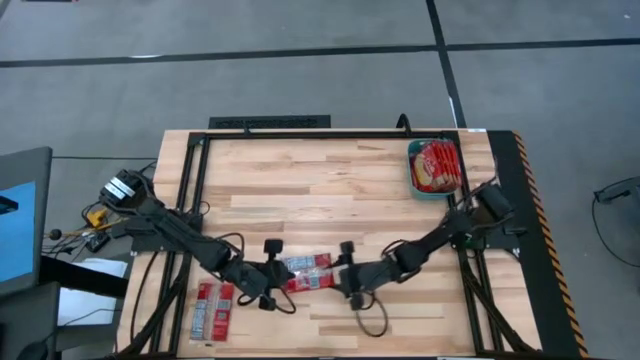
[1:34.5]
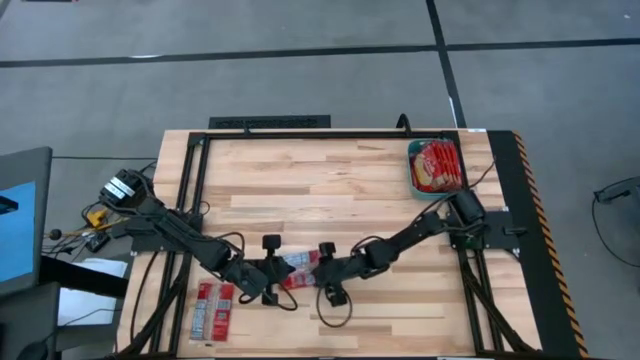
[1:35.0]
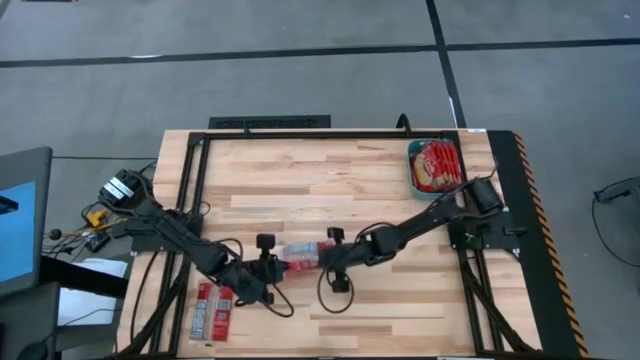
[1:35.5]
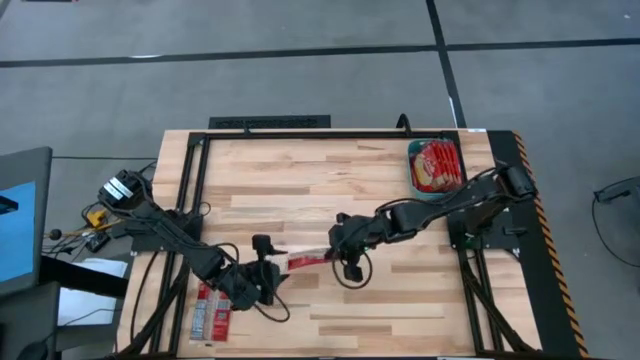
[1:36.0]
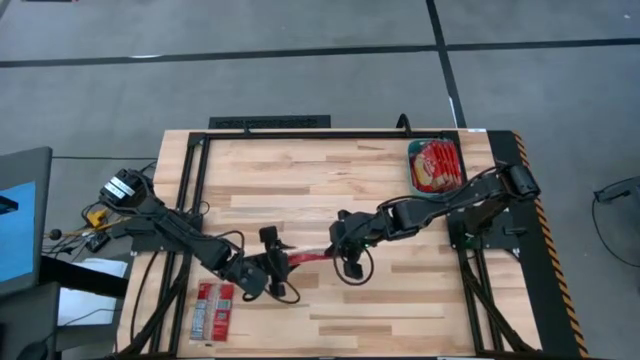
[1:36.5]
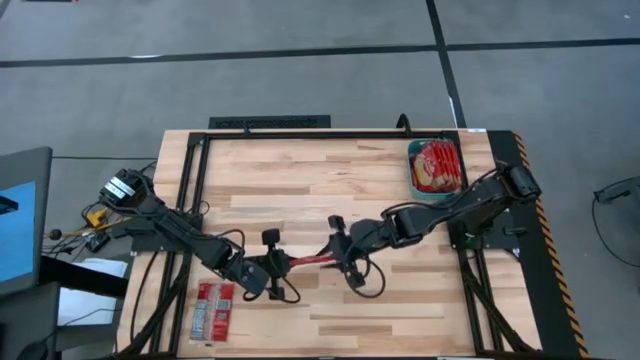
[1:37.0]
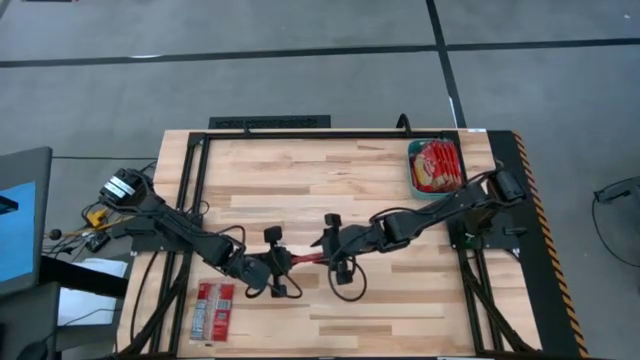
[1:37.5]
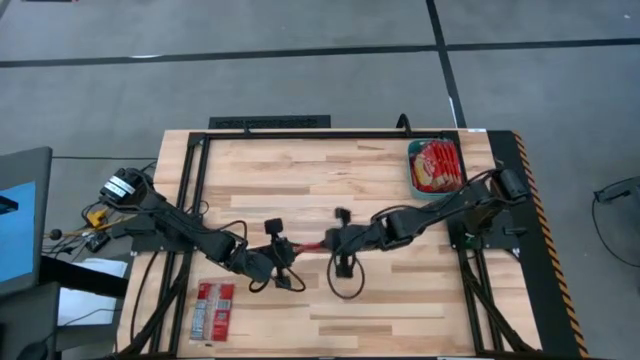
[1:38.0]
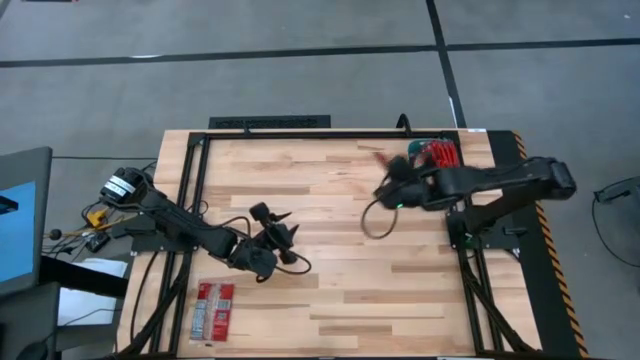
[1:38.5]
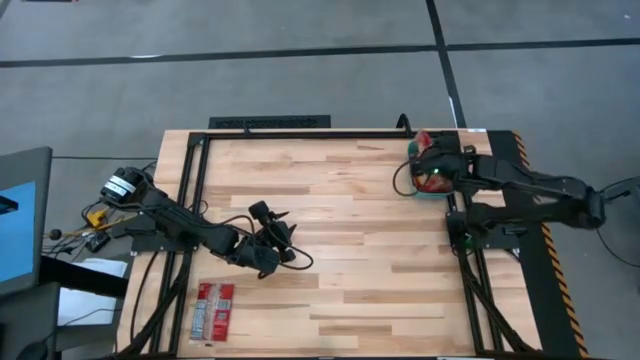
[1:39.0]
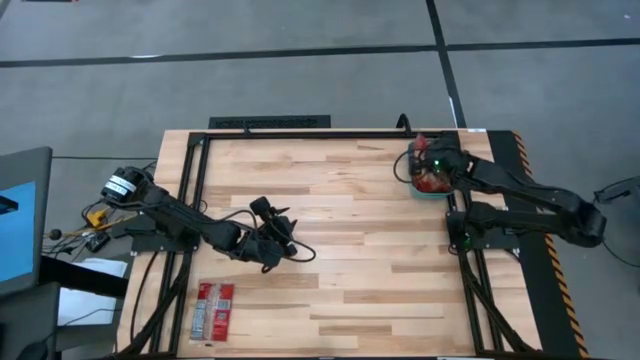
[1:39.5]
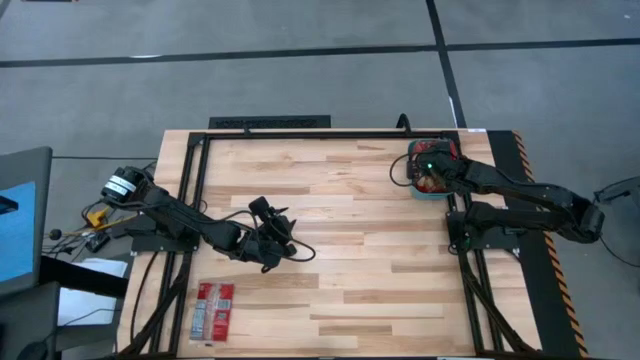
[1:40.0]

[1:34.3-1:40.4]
Task: Sort popcorn bags into baskets
Put the popcorn bag into the green bin

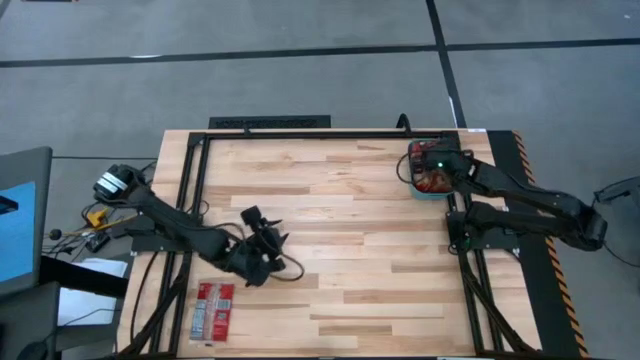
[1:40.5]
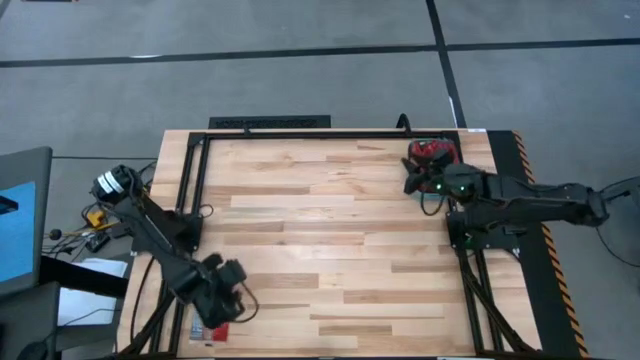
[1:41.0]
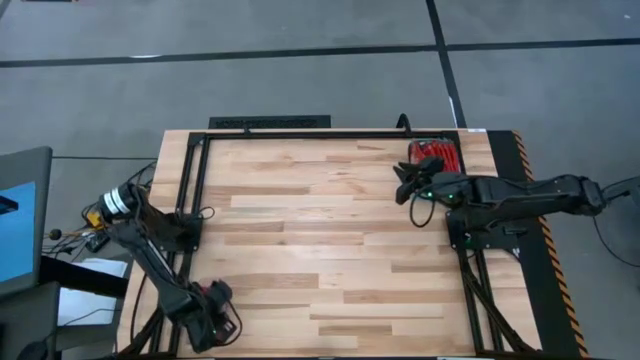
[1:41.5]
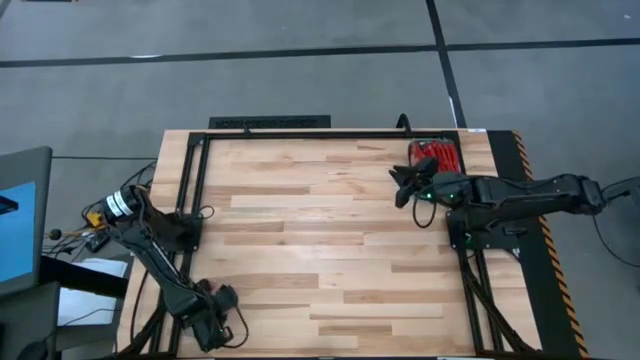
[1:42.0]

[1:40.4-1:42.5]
Put the popcorn bag into the green bin

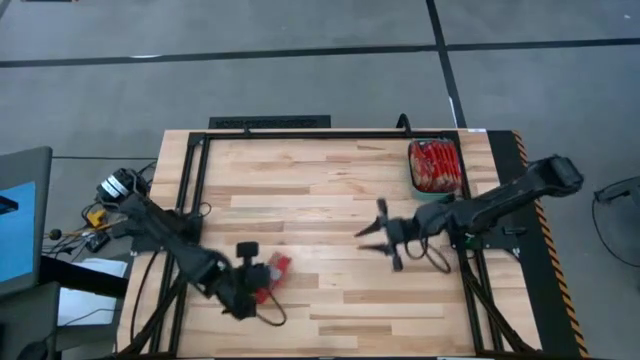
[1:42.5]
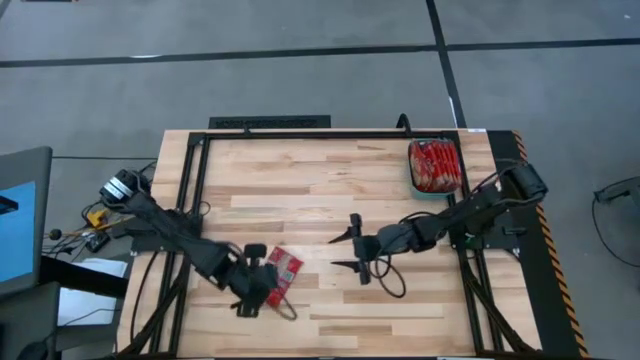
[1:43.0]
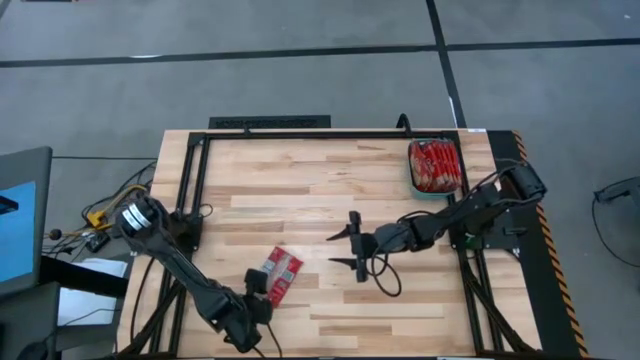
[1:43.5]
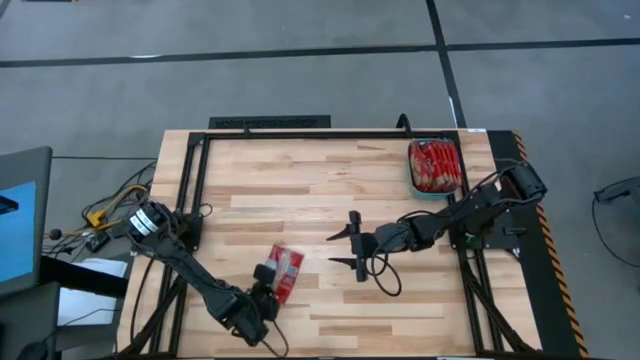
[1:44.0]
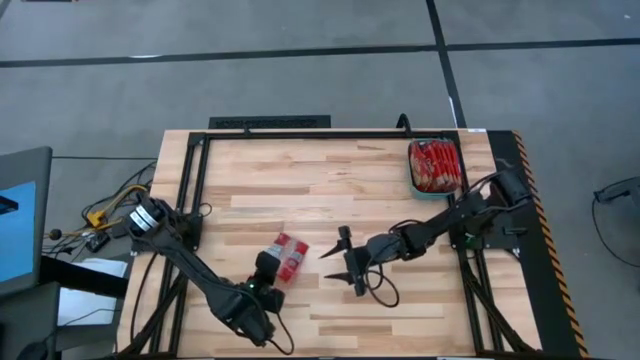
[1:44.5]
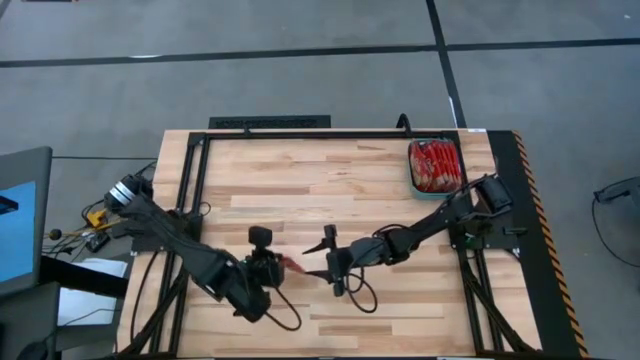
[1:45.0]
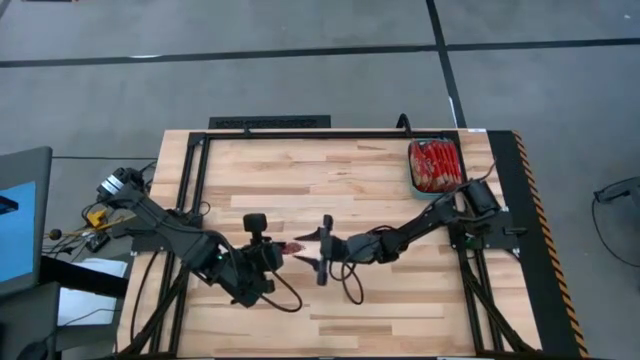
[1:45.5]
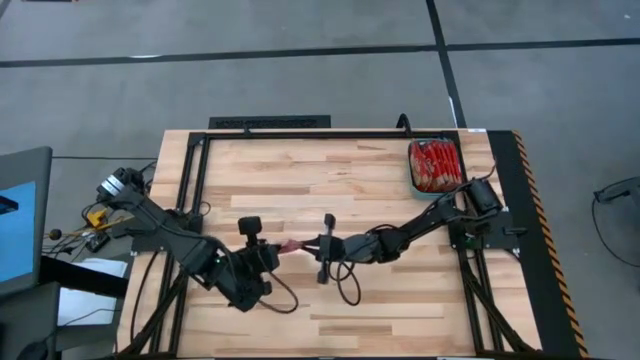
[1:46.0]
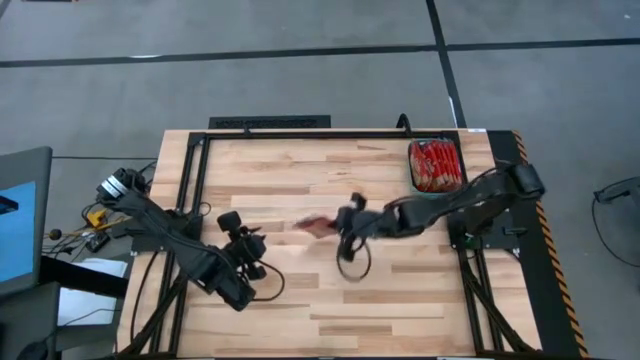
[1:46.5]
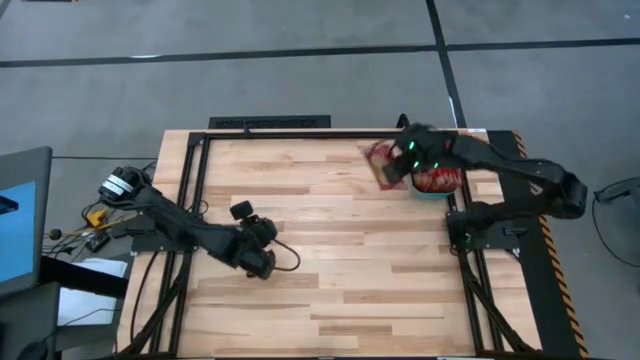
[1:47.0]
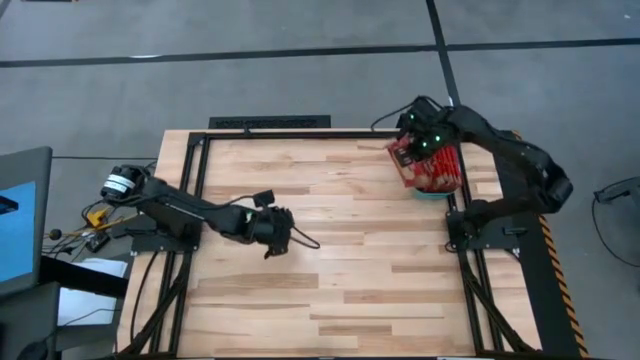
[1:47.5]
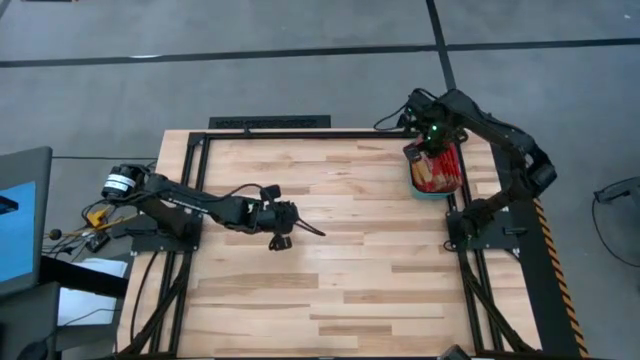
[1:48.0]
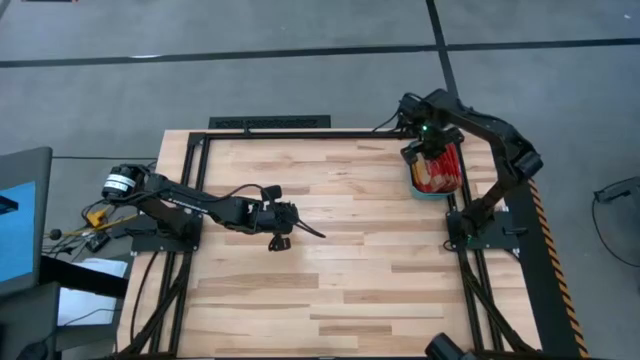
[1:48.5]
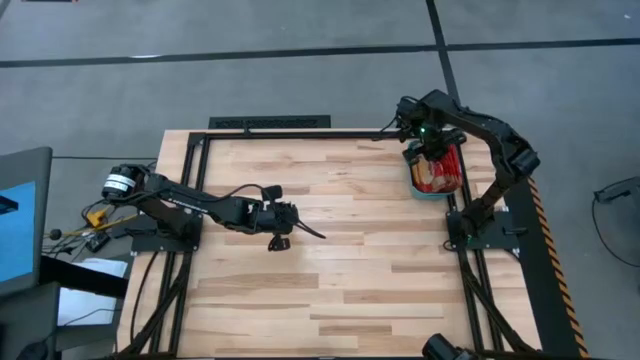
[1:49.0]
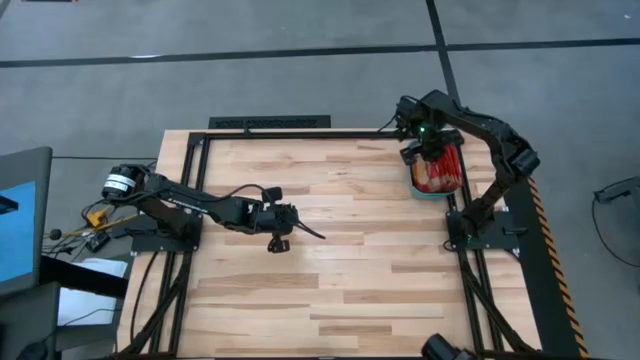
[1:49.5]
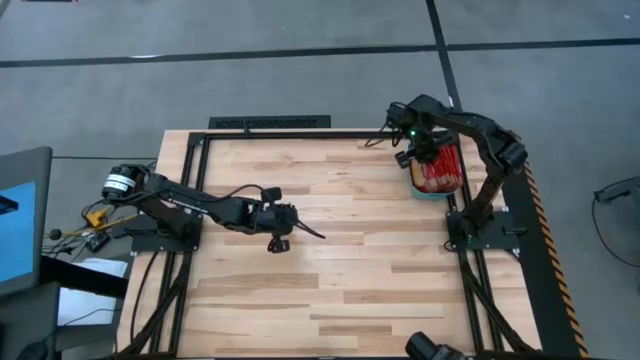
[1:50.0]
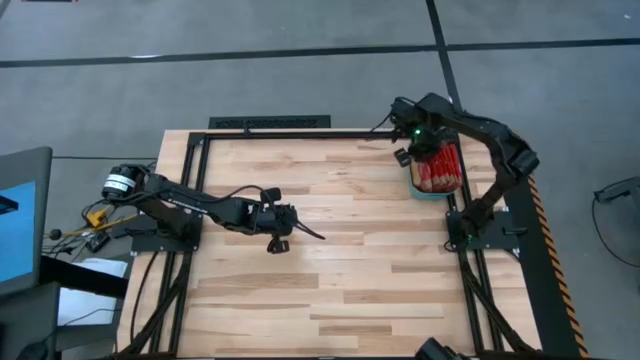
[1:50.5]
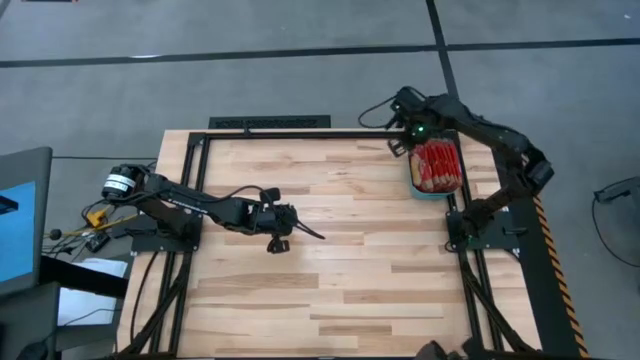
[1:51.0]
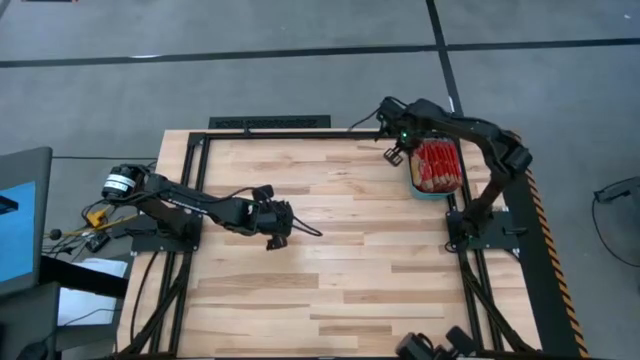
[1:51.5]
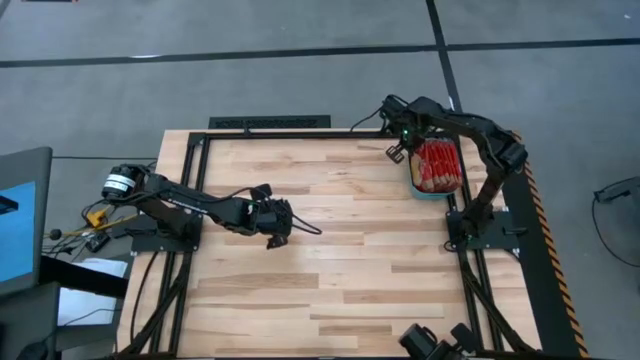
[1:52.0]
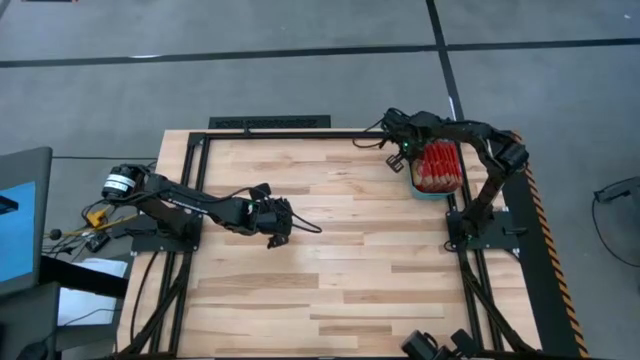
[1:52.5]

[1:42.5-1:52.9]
Put the popcorn bag into the green bin
